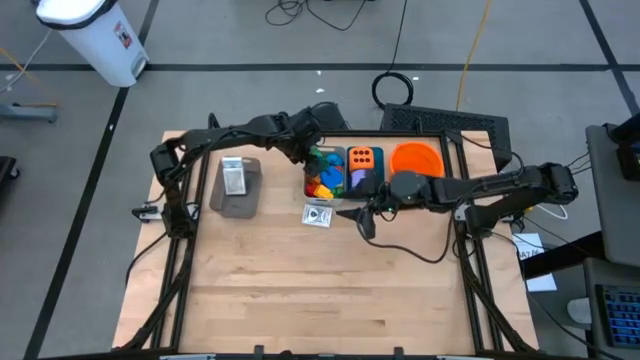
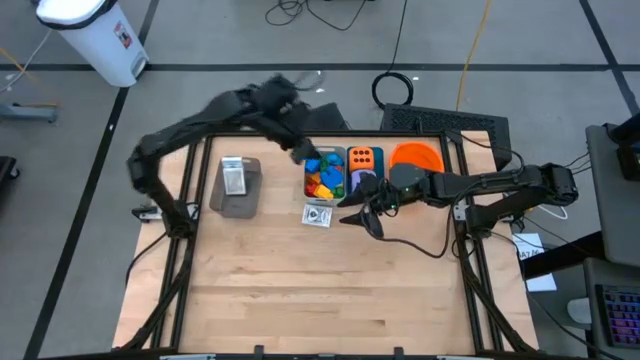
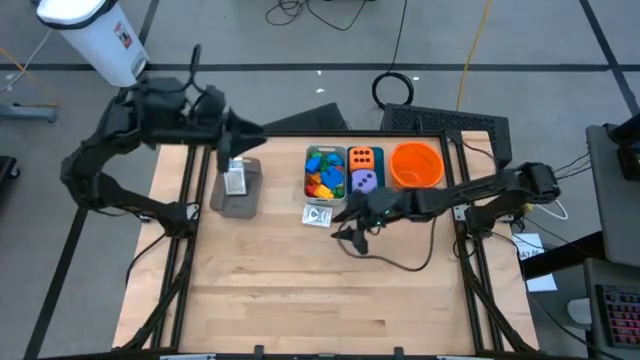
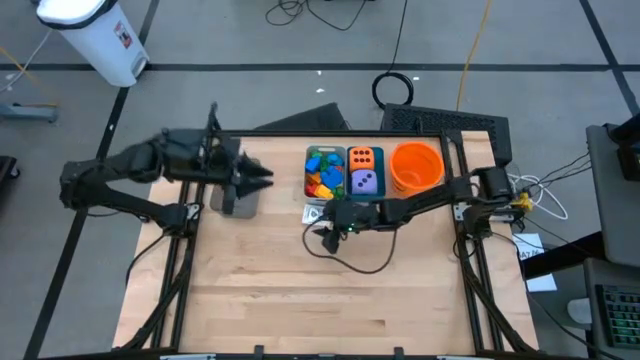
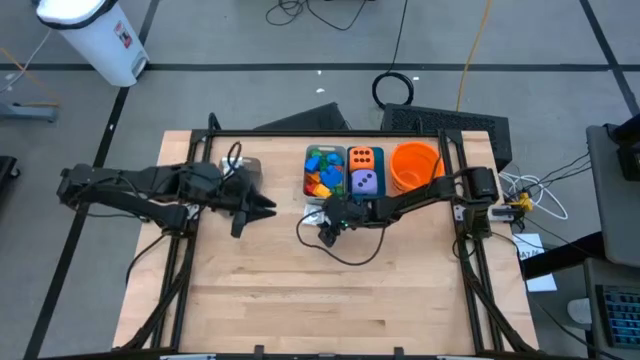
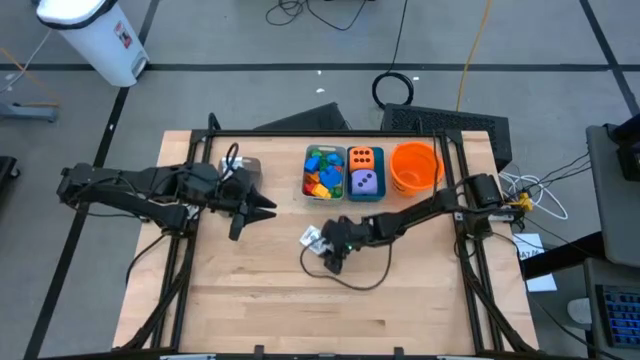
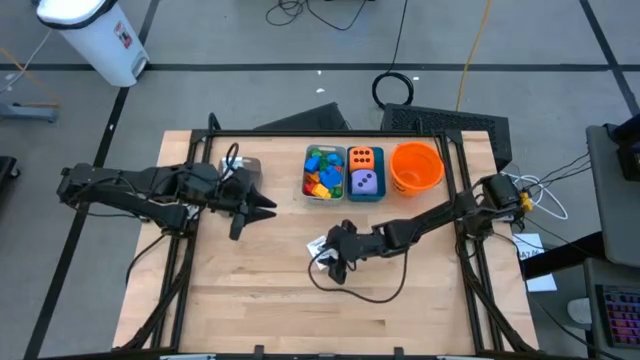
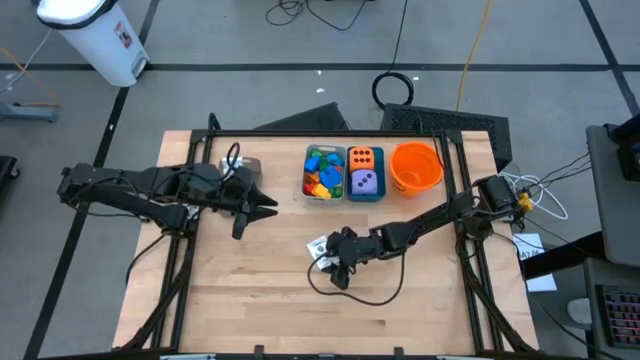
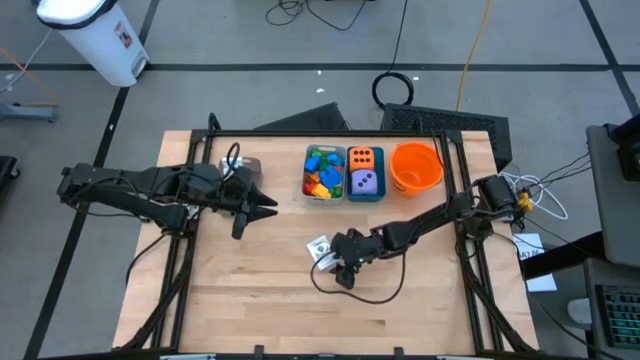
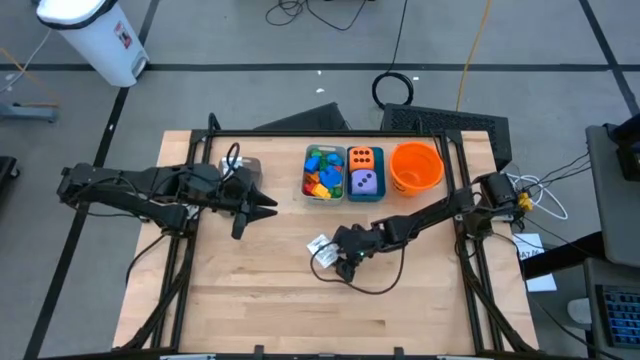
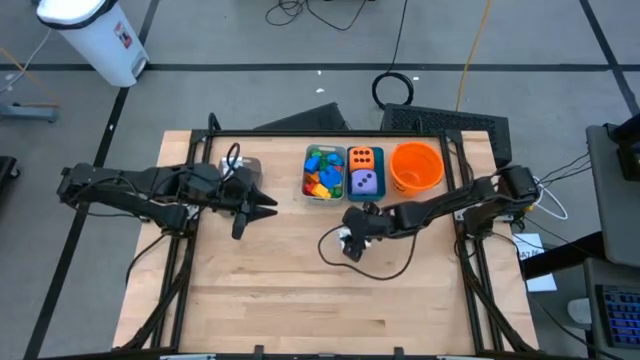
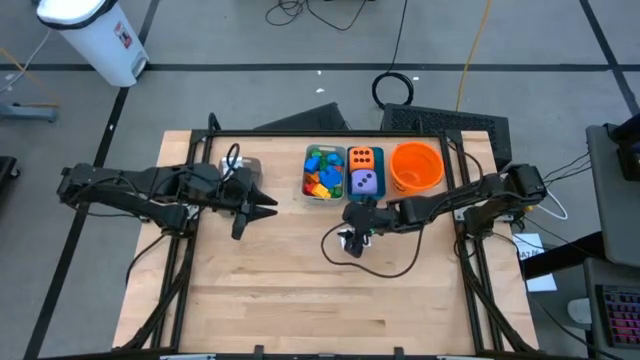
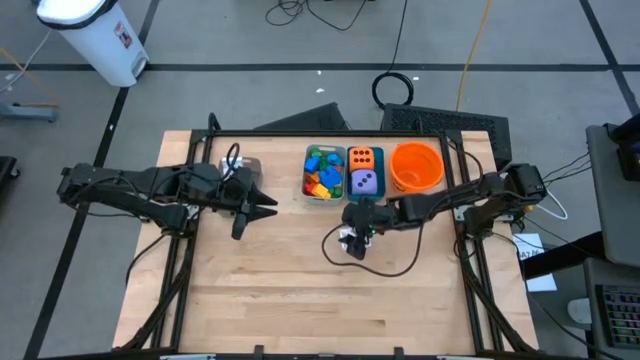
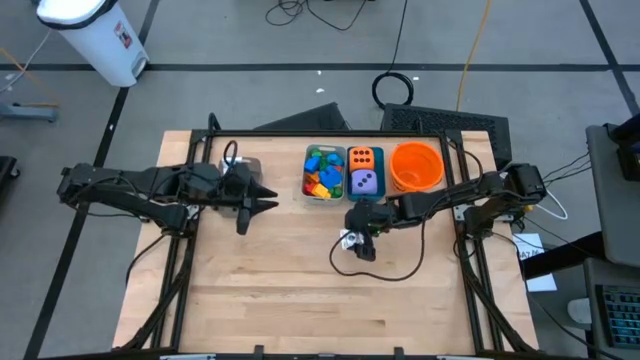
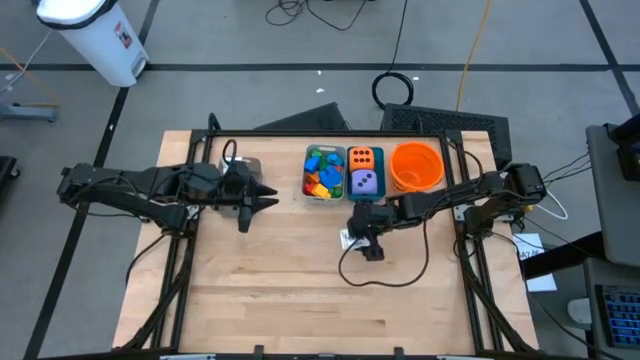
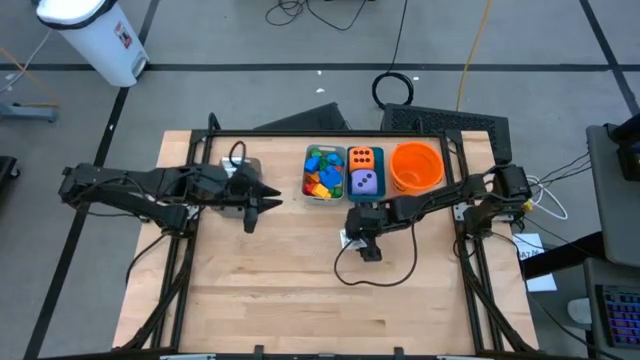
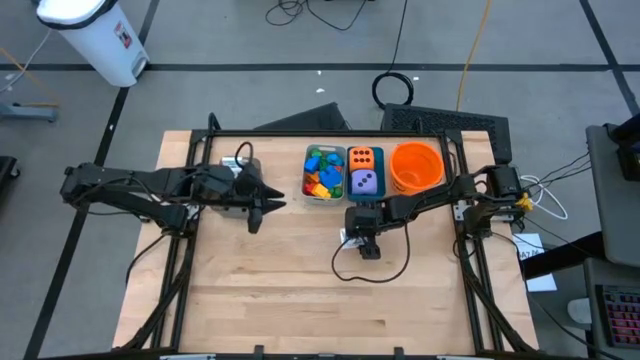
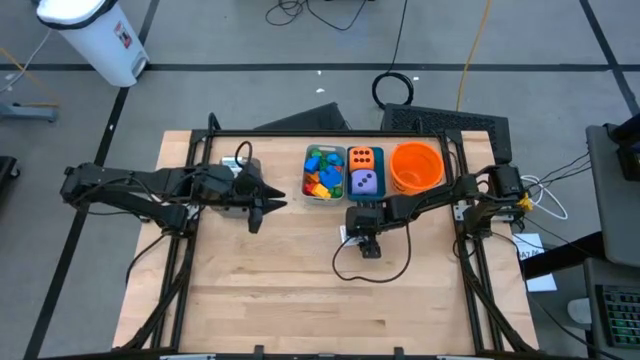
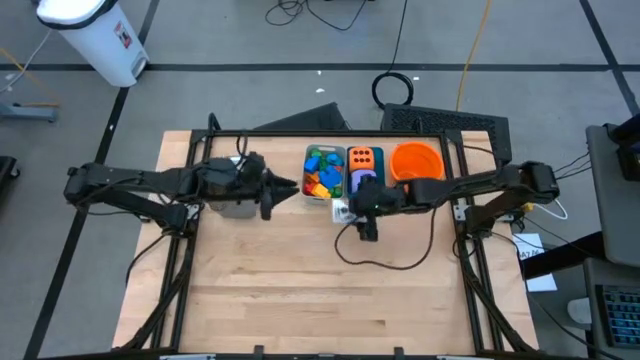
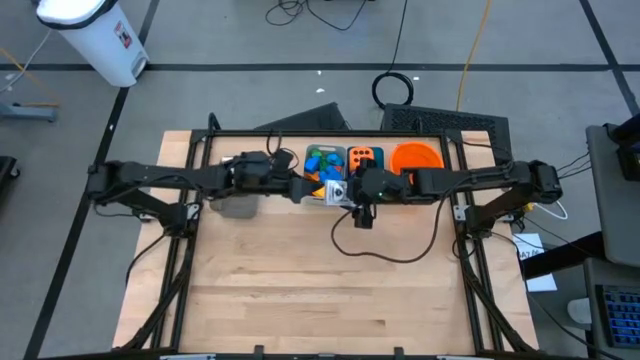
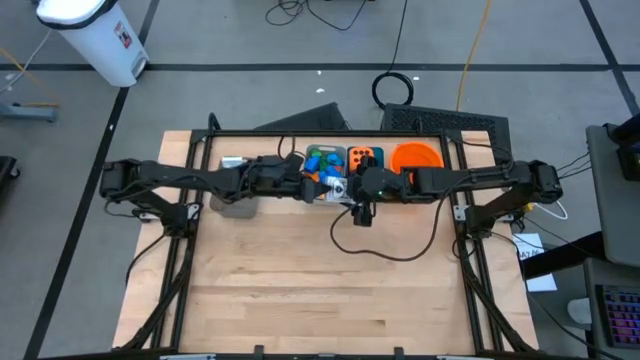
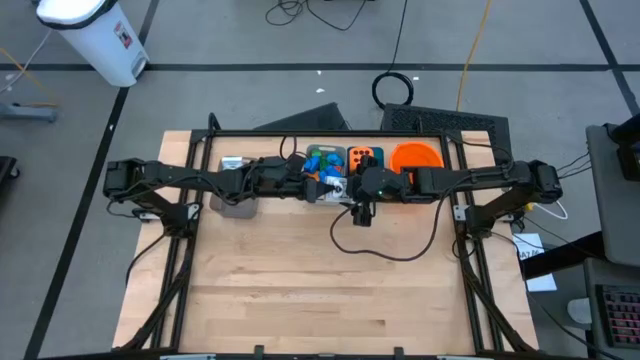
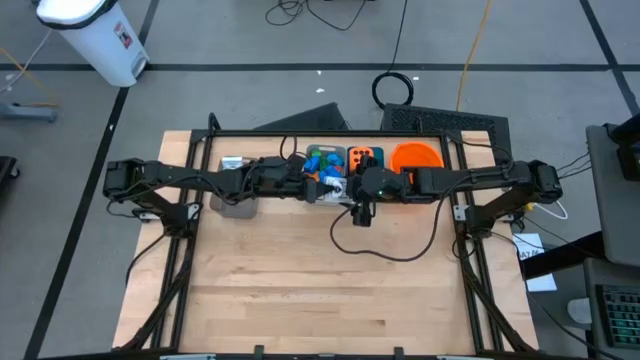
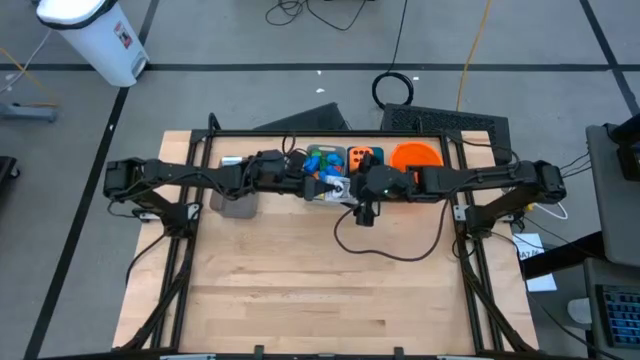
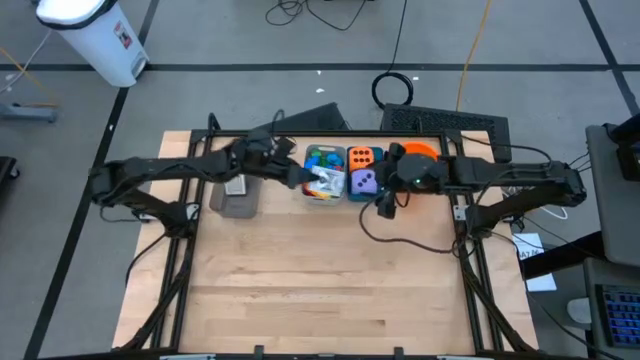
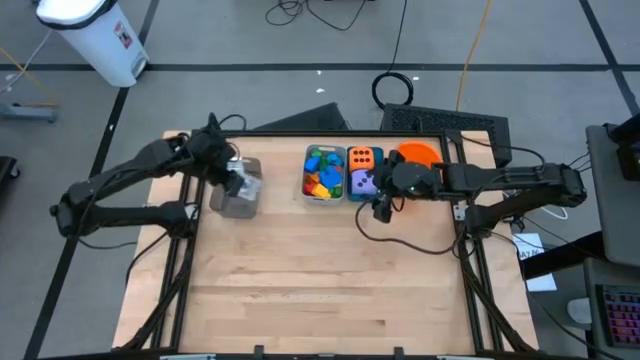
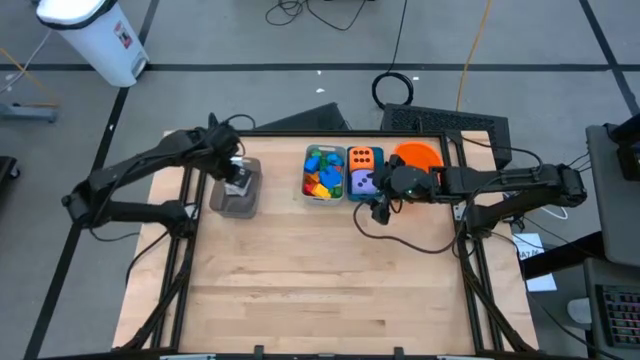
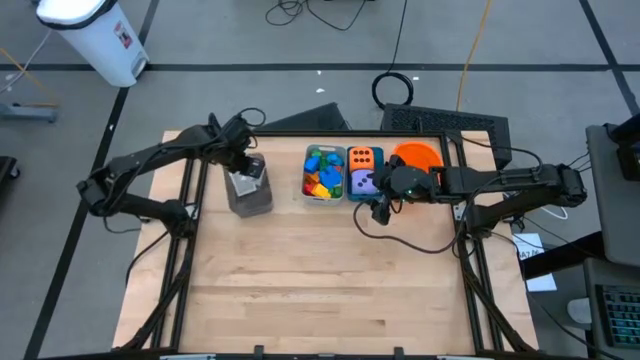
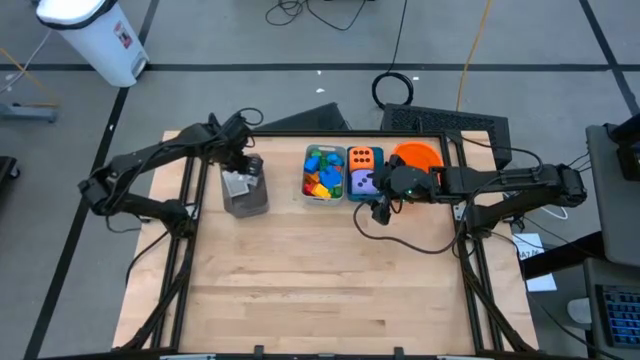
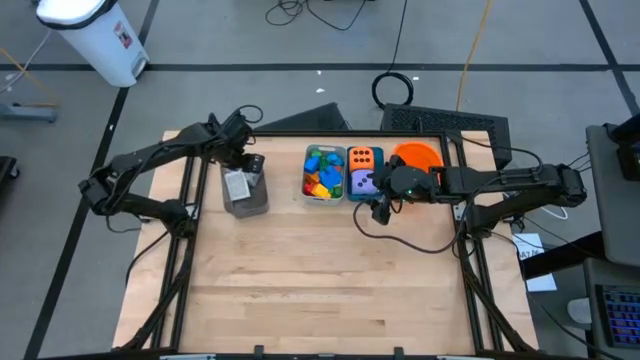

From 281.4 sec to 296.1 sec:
Task: Pick & Place Toys
Put the black deck of cards into the black bin

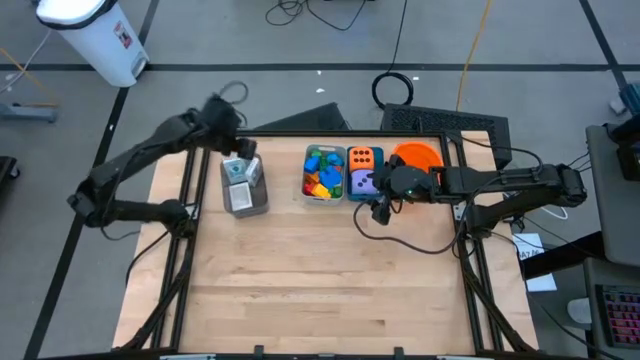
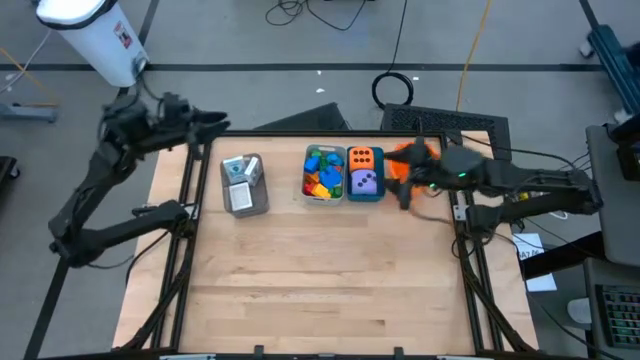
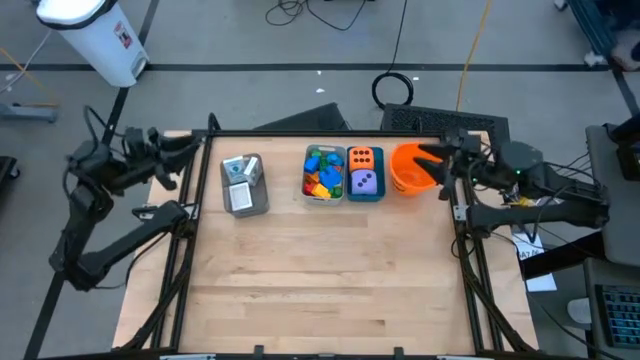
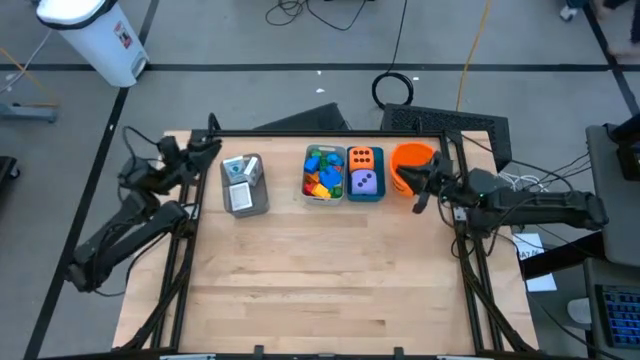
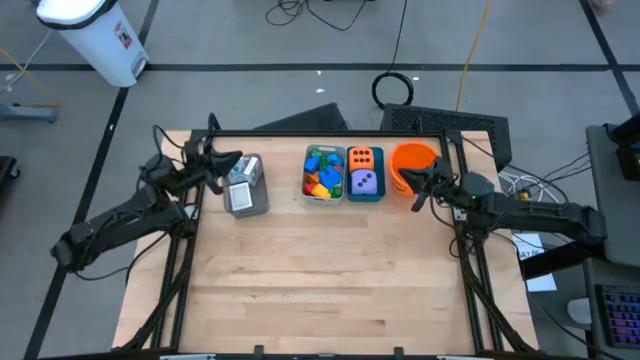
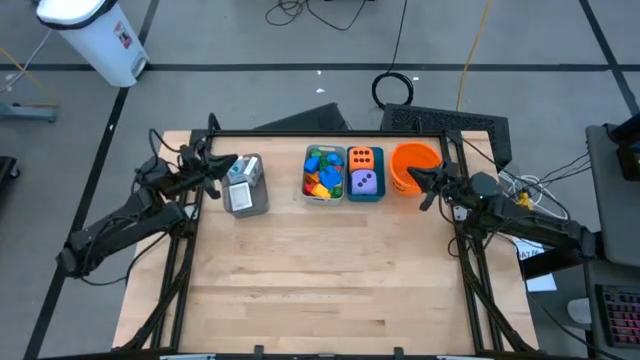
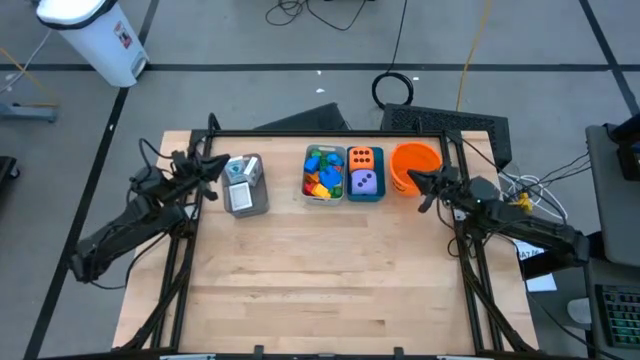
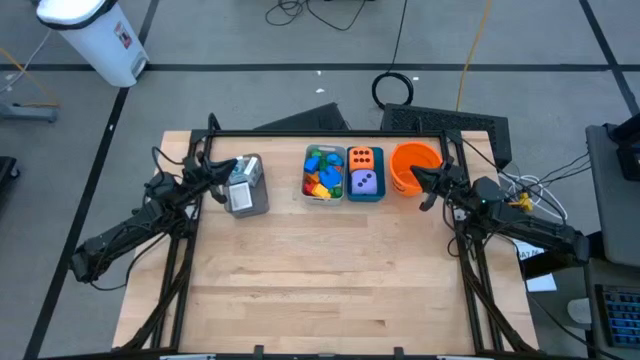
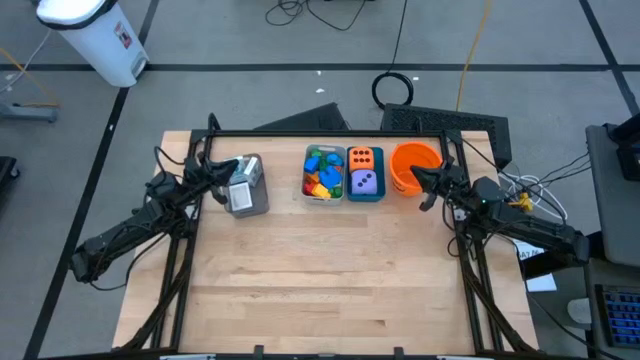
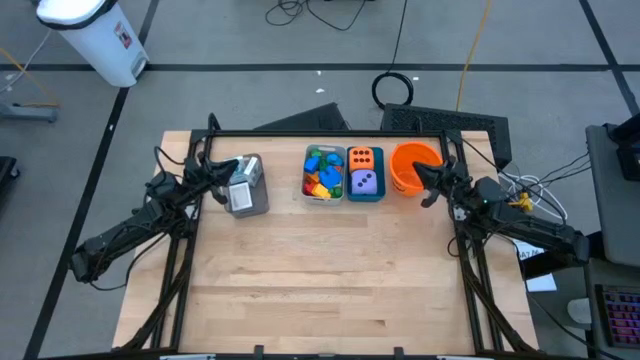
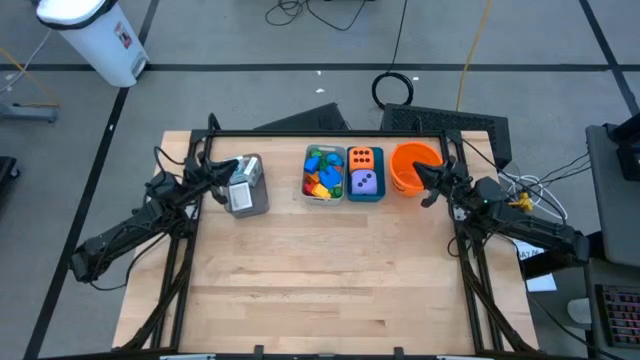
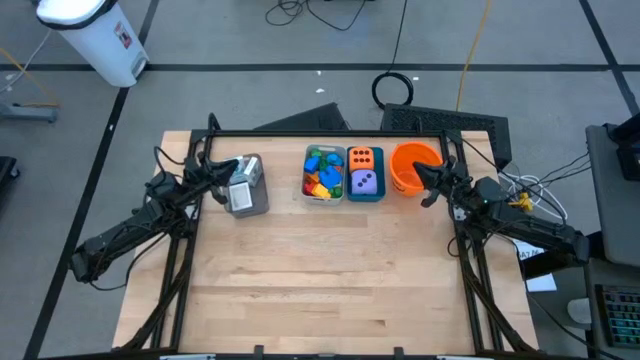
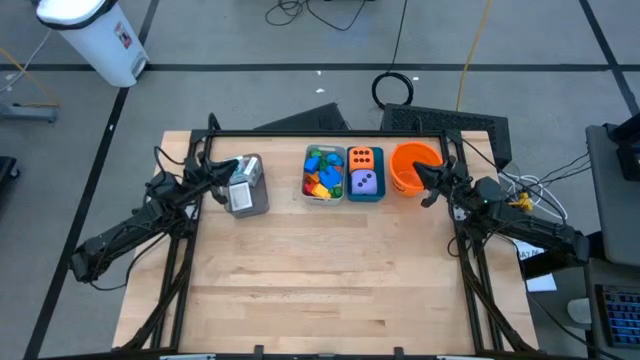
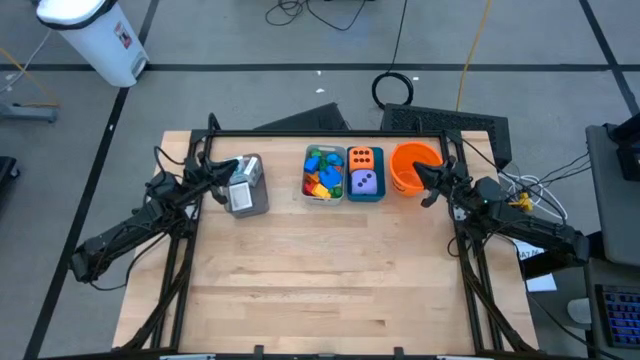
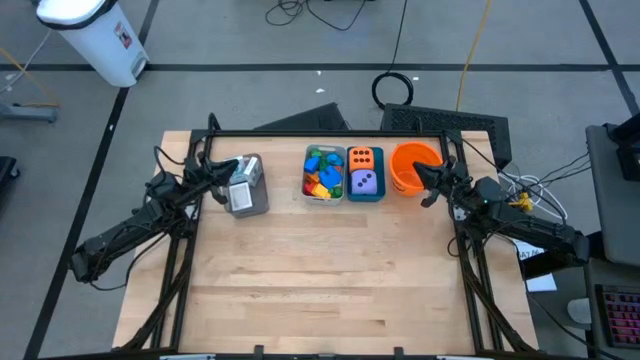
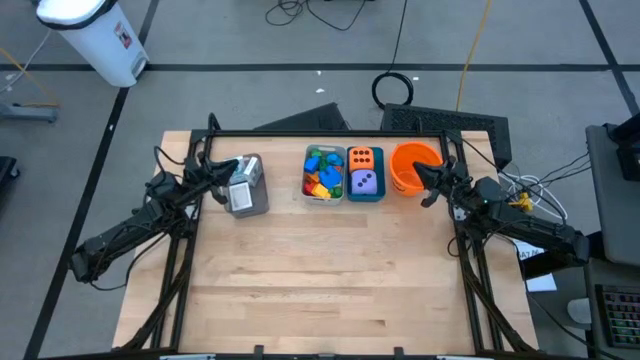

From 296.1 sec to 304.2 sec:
Return to Home Position
